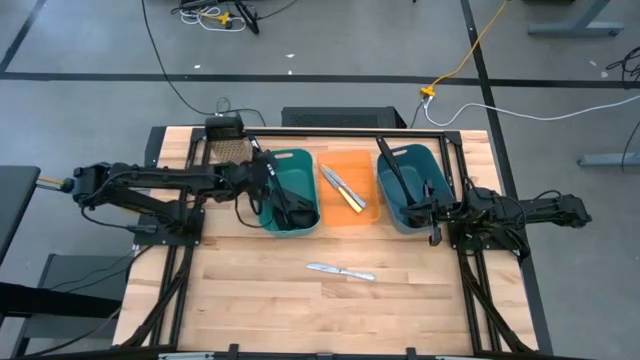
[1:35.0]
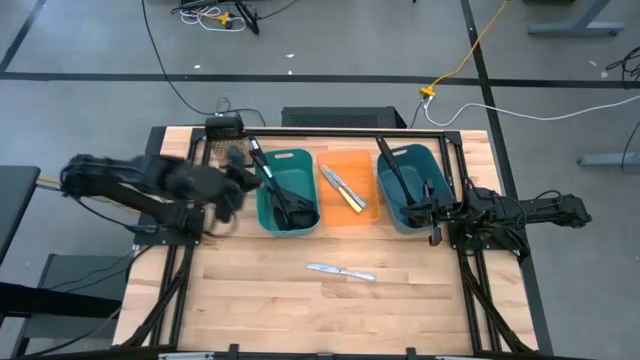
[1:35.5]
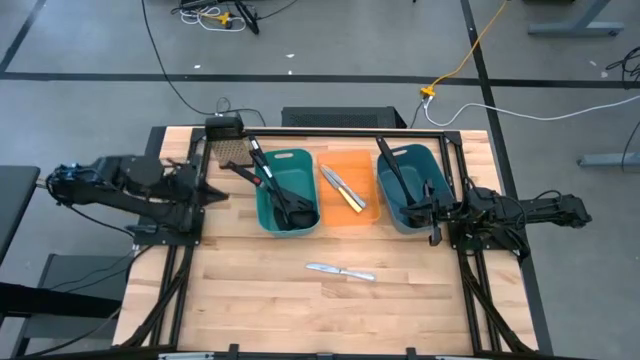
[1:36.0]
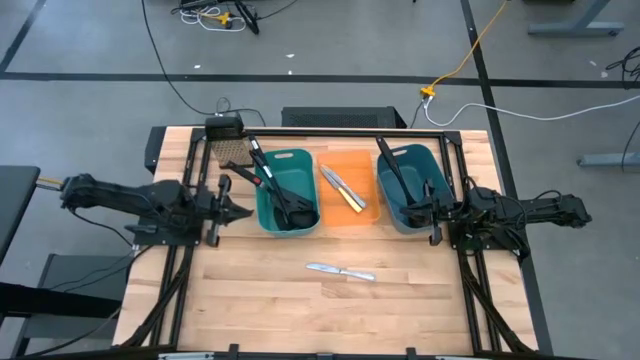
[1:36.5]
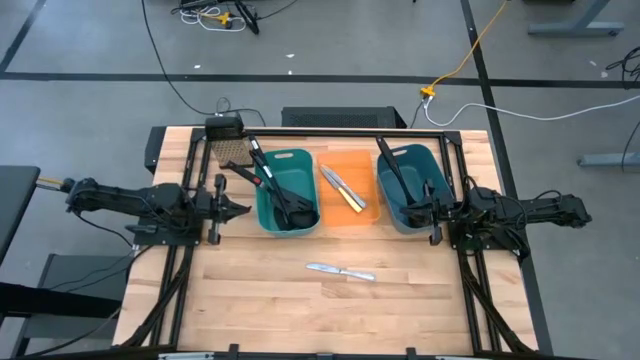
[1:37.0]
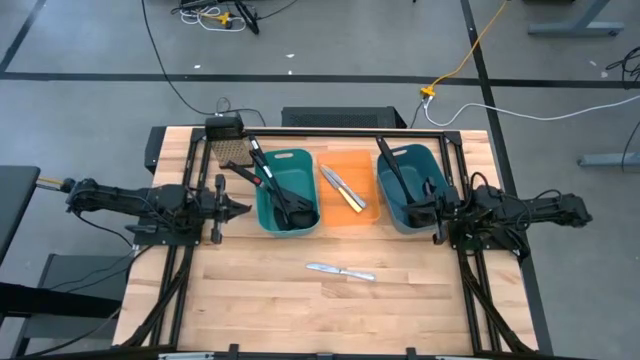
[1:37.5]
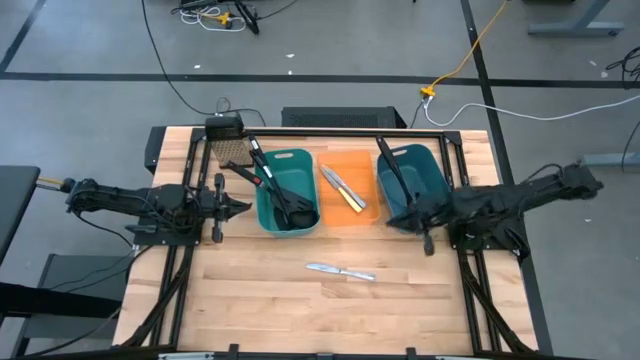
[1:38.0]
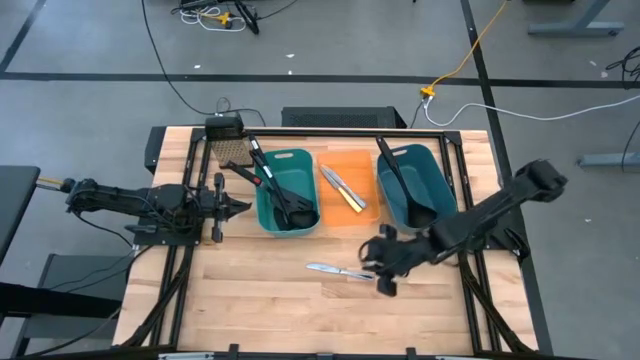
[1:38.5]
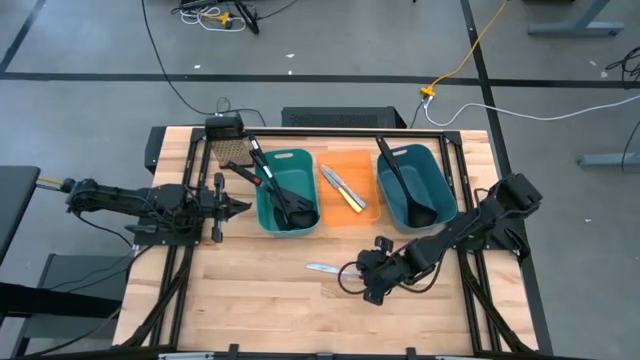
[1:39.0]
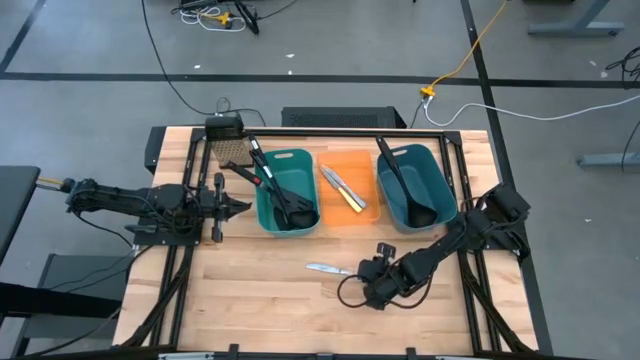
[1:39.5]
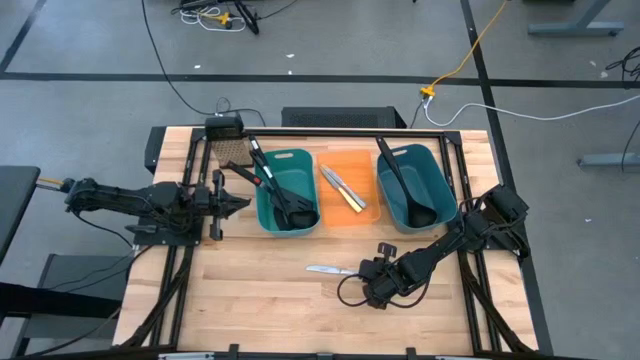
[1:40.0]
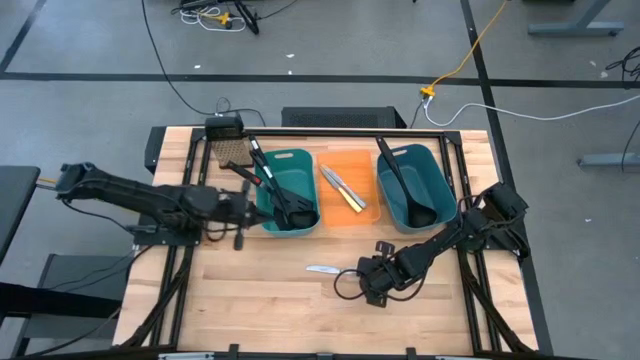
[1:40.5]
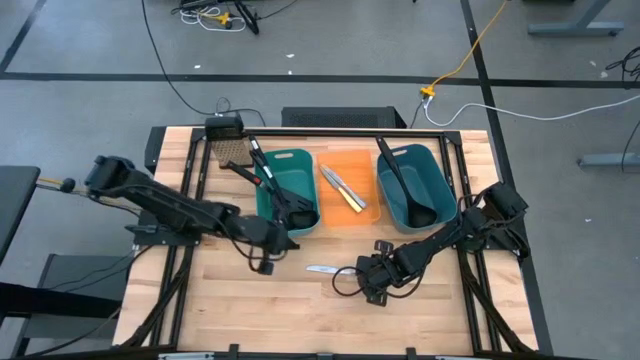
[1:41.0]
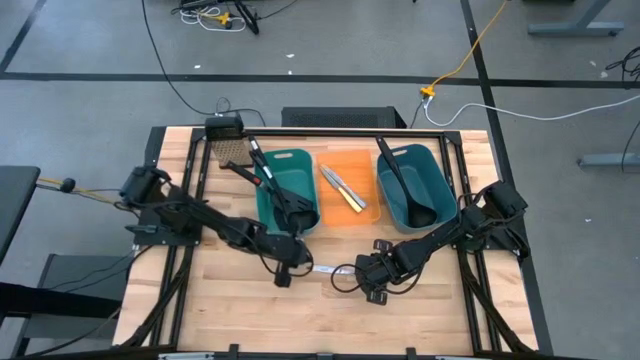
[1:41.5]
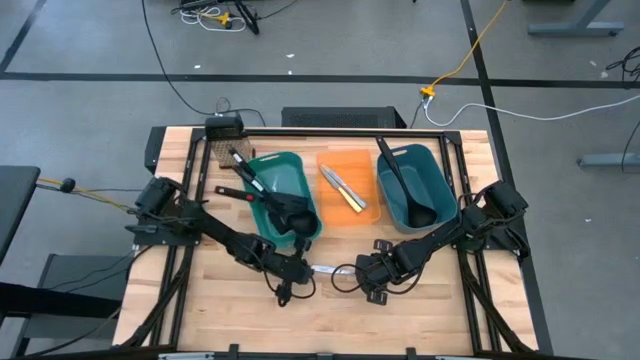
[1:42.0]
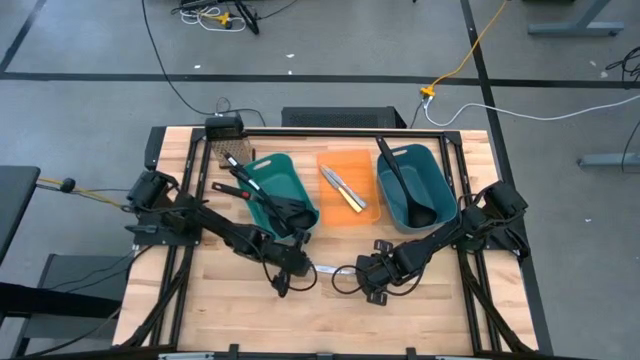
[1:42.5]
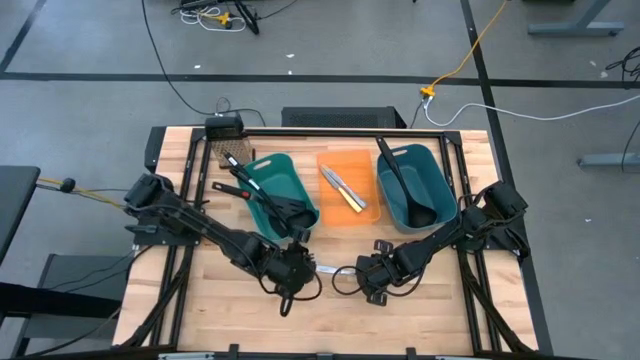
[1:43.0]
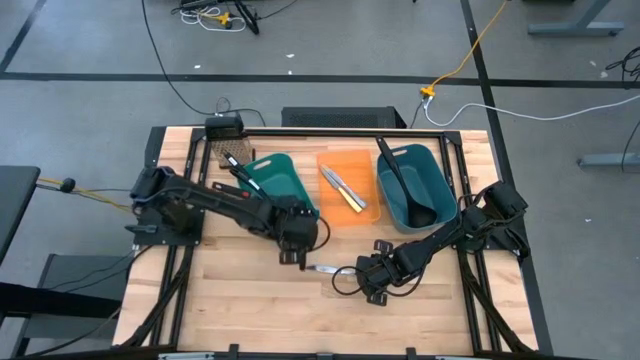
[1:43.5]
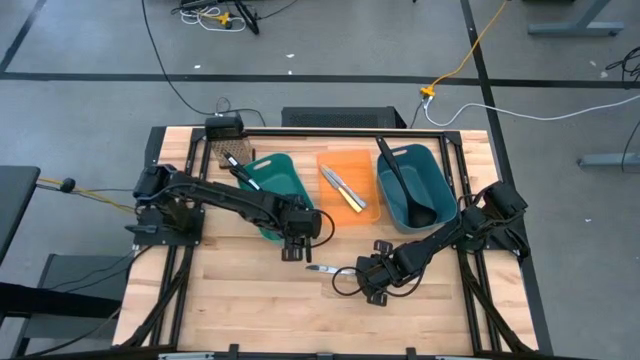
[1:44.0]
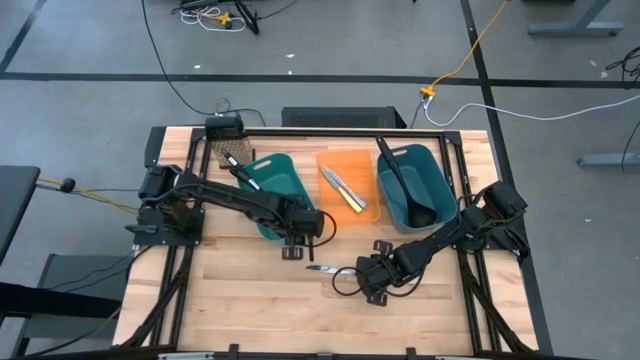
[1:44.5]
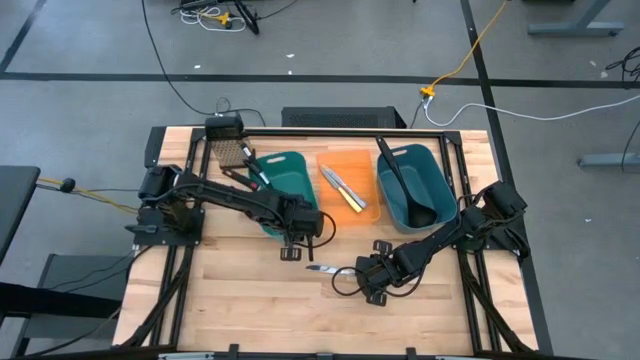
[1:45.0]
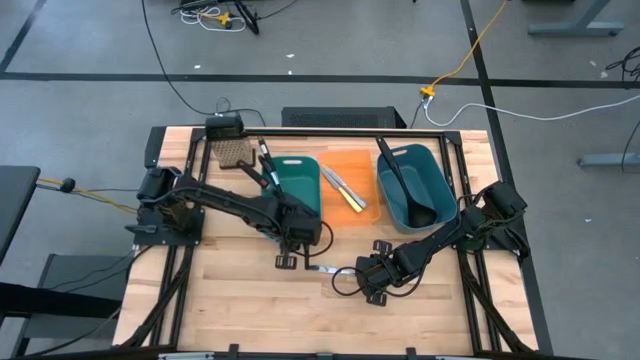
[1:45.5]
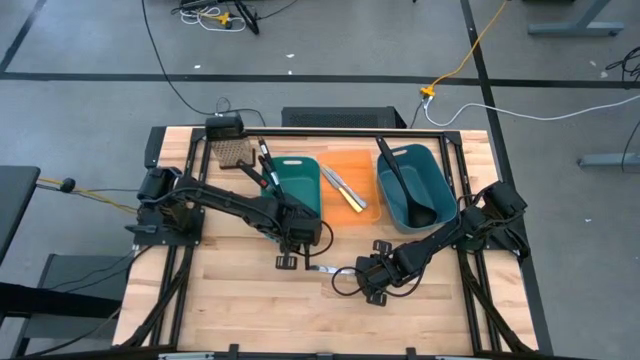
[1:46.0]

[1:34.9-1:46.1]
Task: Pick & Place Kitchen Items
Adjust the dark green bin on the table

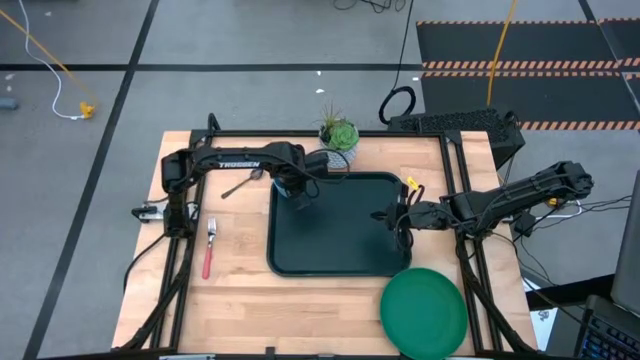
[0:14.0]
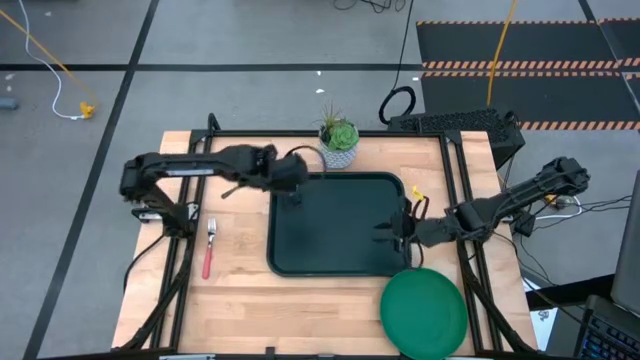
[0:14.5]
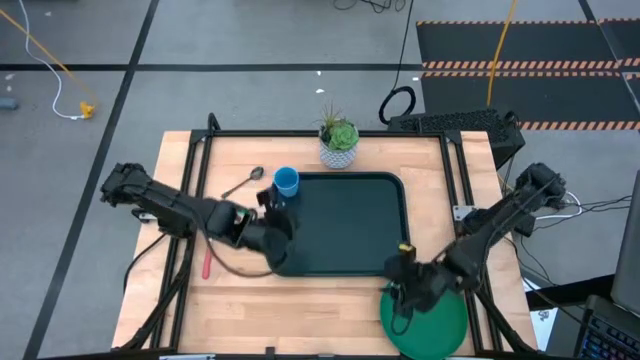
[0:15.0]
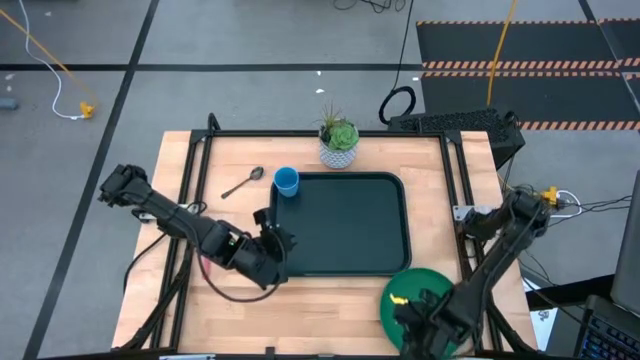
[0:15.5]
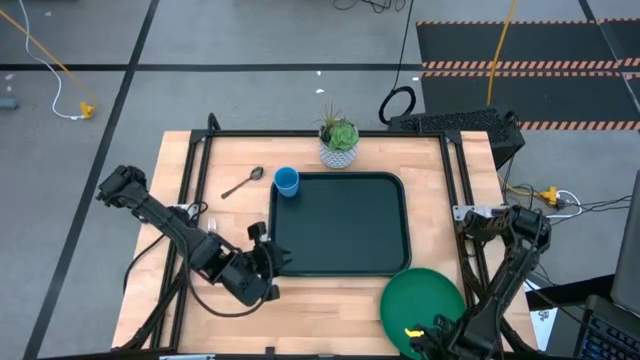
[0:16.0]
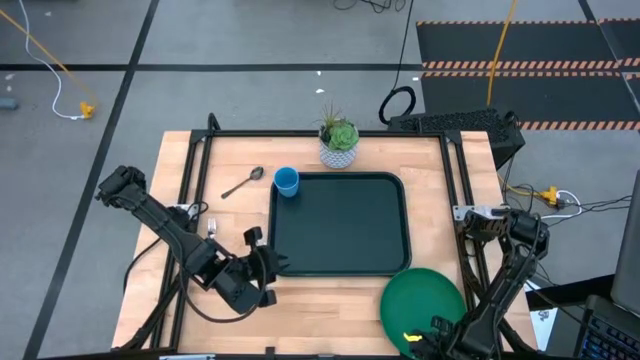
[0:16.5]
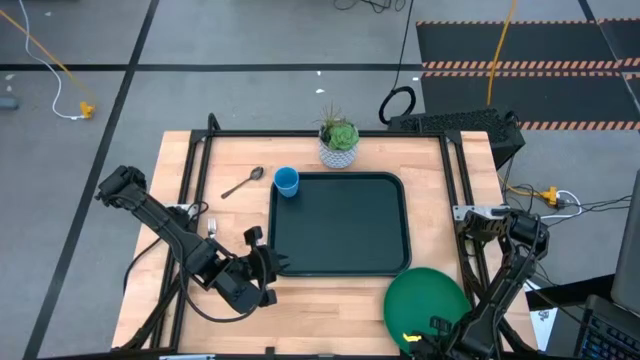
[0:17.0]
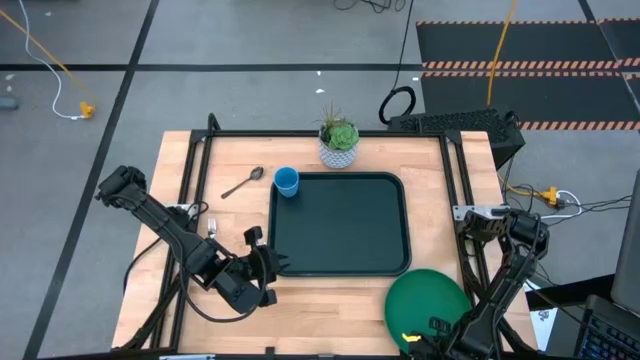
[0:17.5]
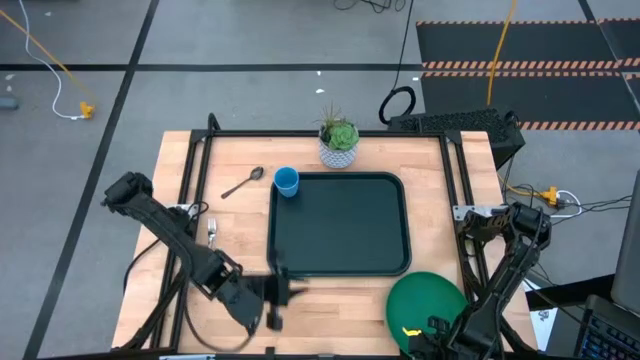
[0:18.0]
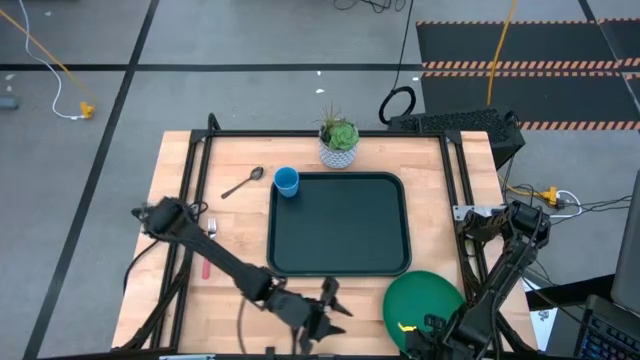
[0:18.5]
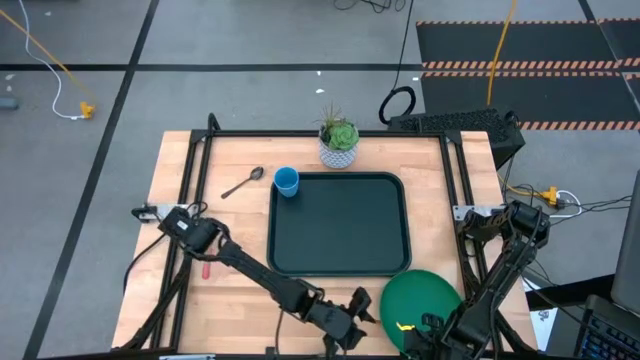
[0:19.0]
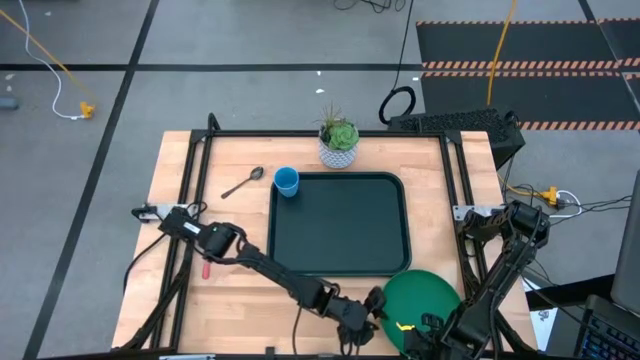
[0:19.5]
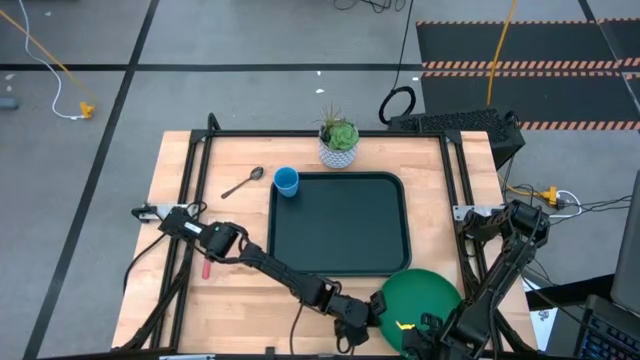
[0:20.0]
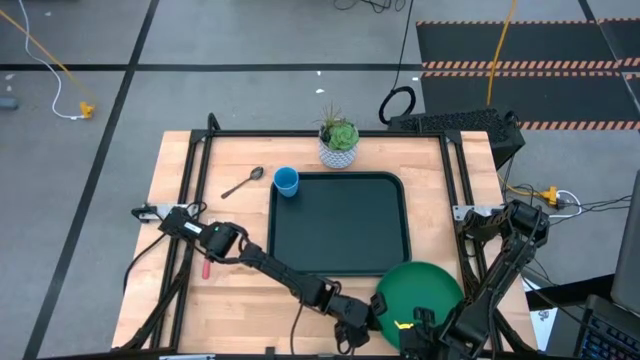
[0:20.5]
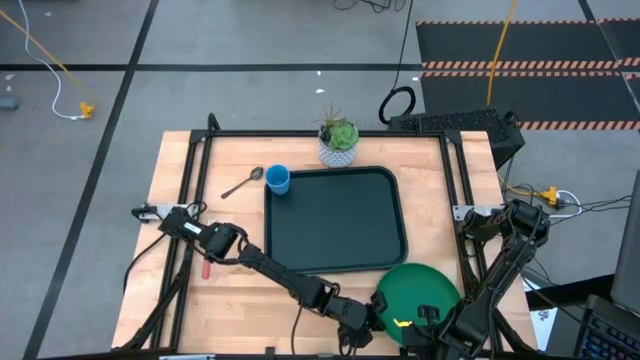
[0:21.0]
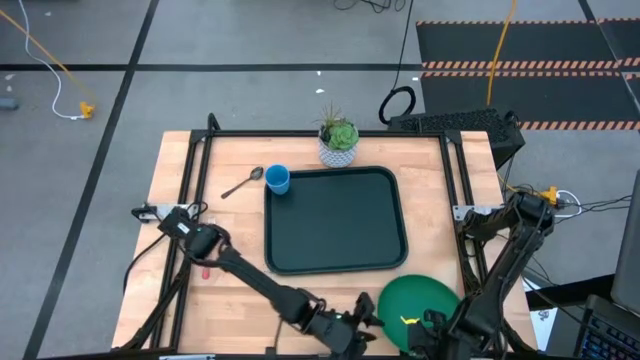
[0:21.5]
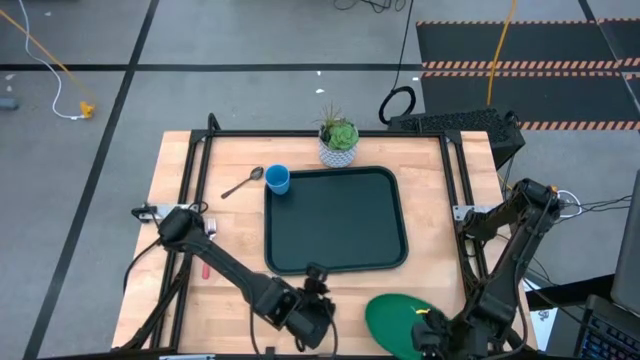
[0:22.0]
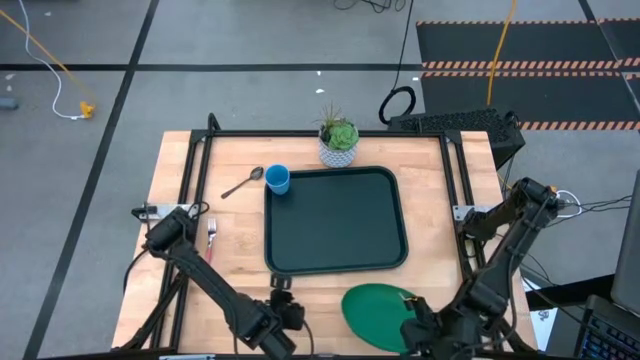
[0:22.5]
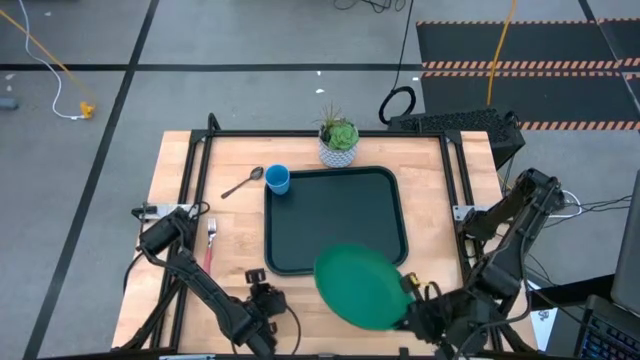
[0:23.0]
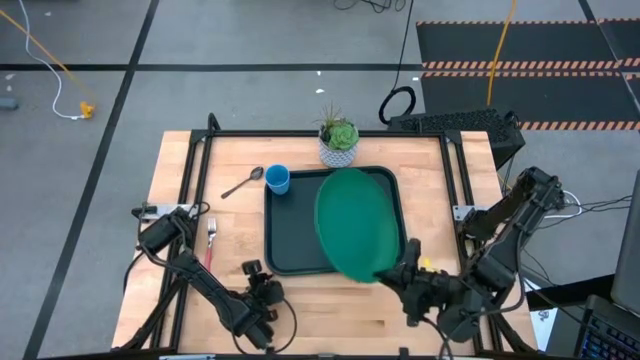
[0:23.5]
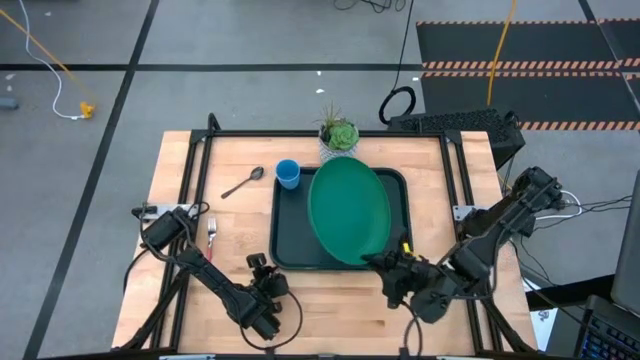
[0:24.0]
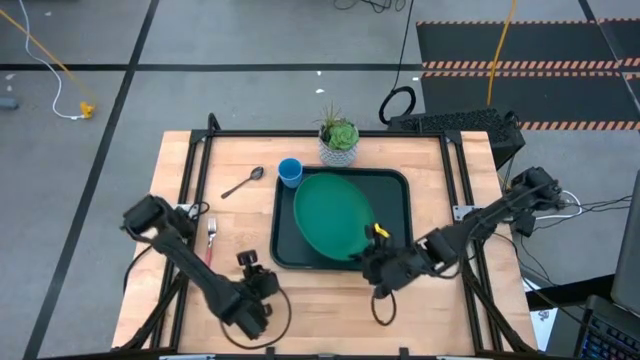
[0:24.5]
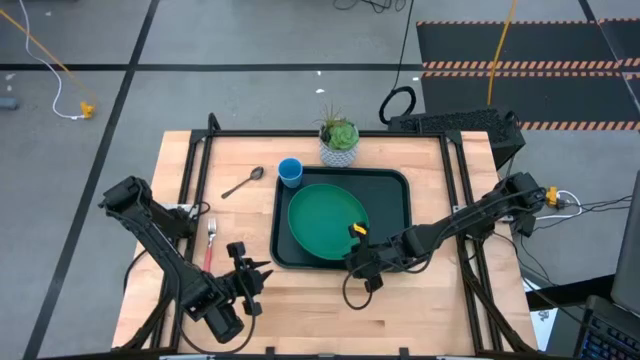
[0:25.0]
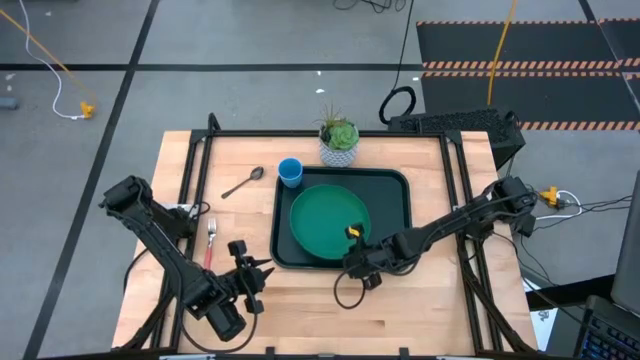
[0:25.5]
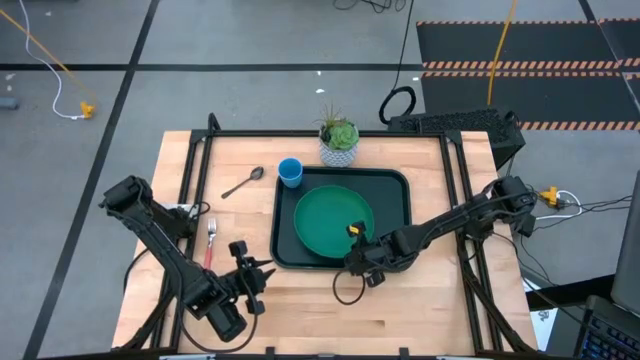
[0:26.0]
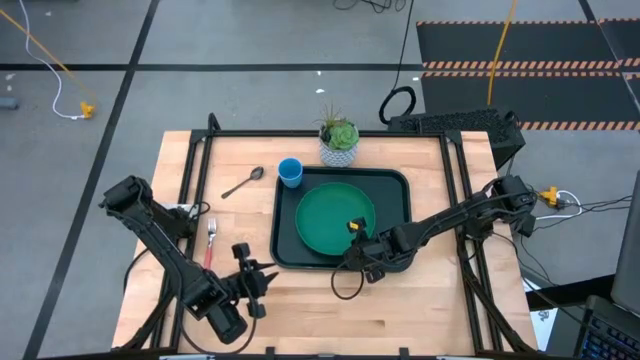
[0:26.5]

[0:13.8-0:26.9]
Task: Pick and place plate/cup/fork/spoon on tray
Put the green plate to the bottom of the blue cup on the black serving tray
